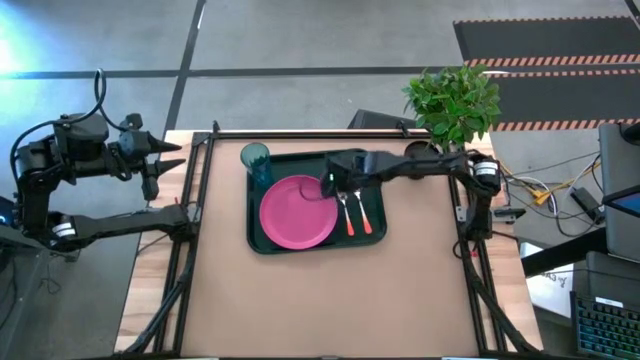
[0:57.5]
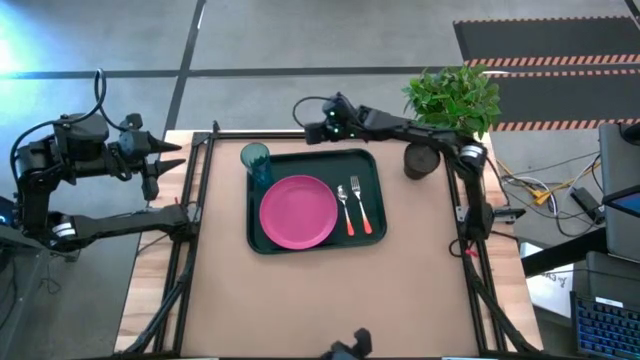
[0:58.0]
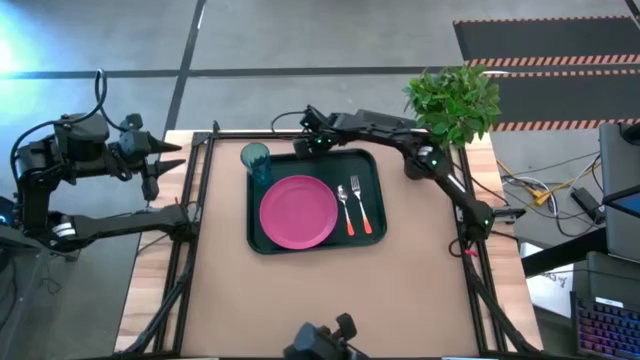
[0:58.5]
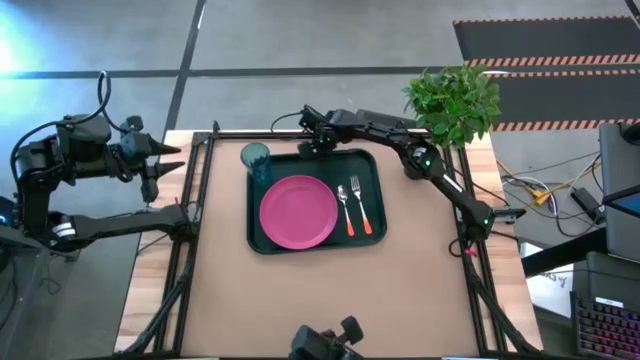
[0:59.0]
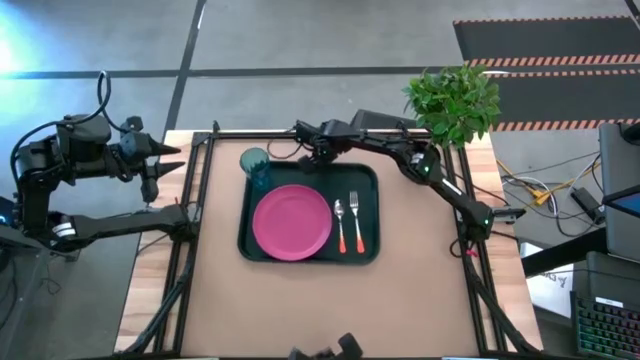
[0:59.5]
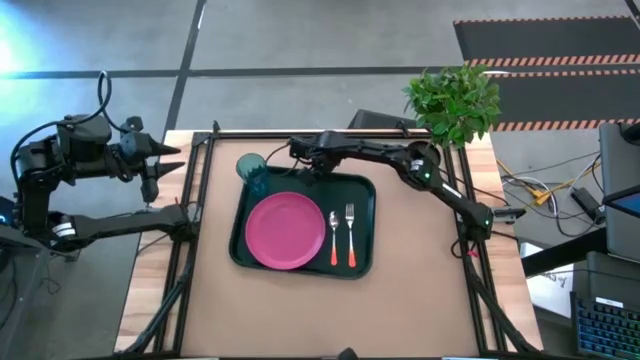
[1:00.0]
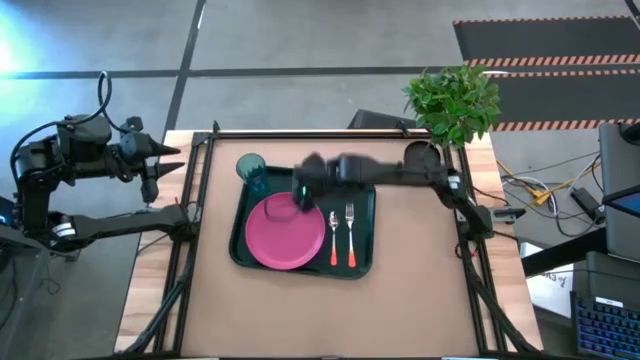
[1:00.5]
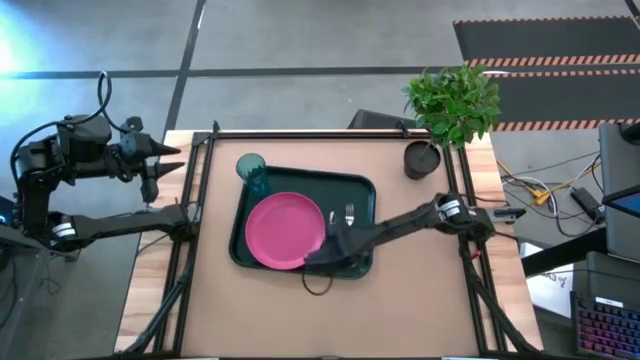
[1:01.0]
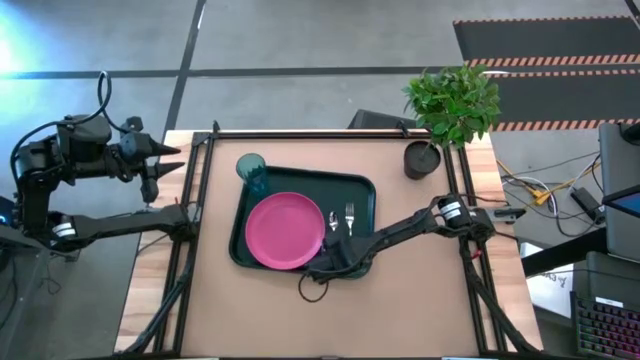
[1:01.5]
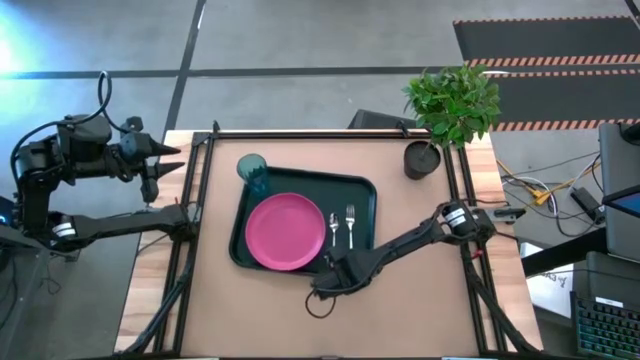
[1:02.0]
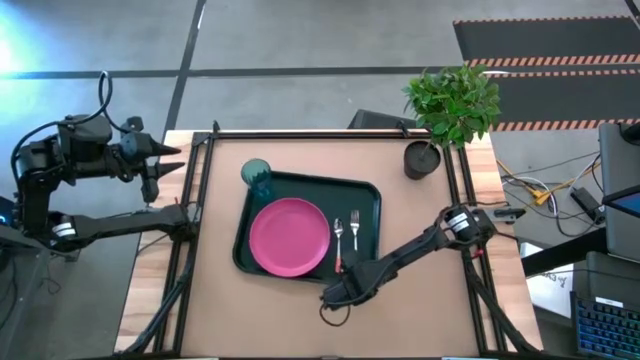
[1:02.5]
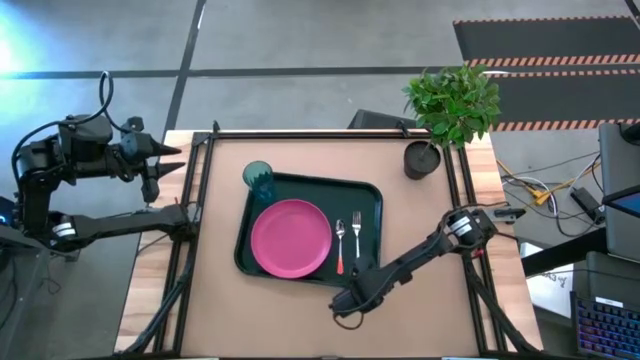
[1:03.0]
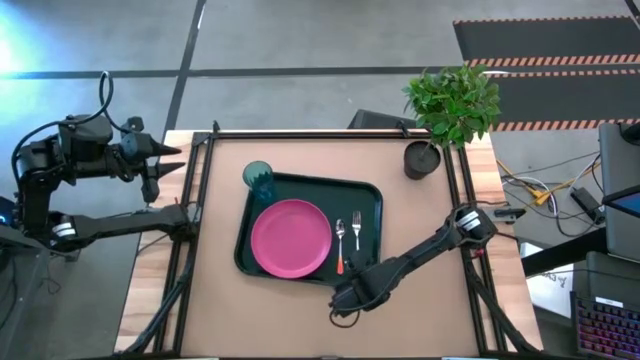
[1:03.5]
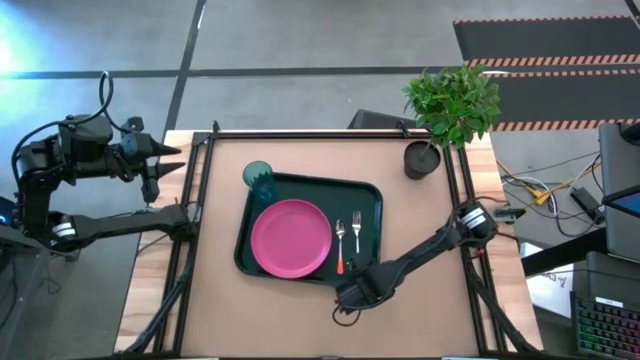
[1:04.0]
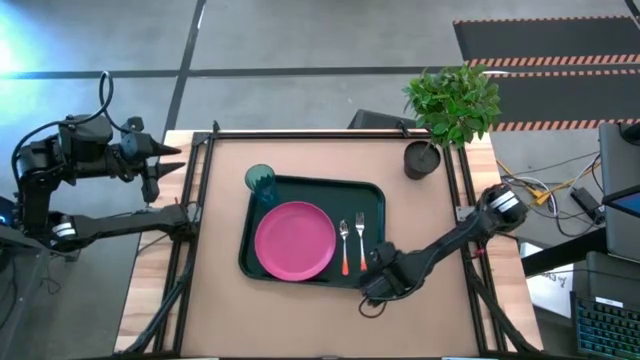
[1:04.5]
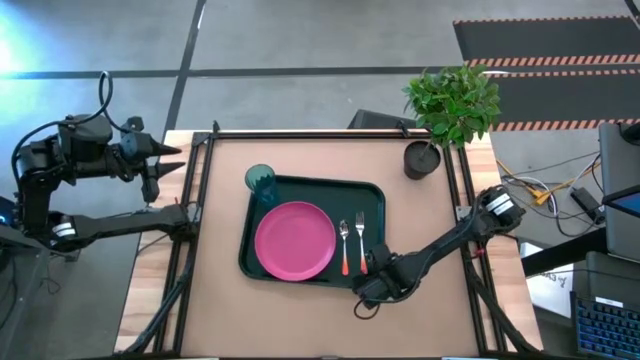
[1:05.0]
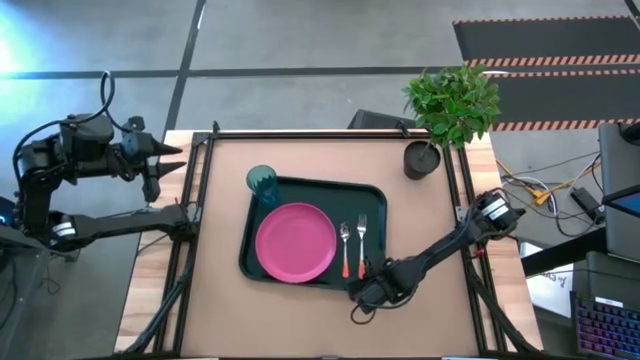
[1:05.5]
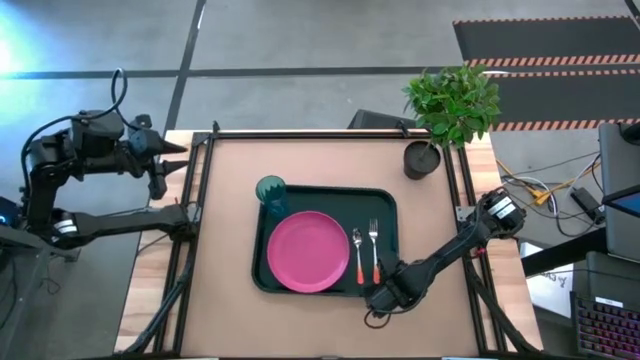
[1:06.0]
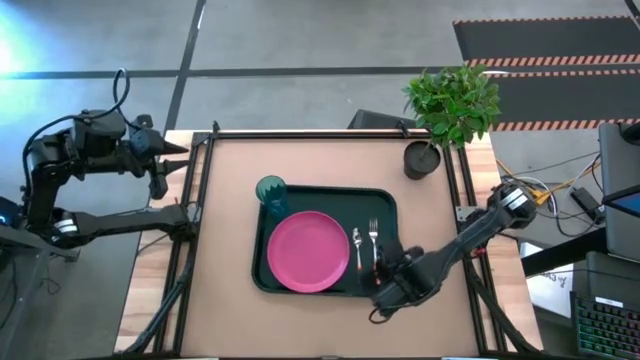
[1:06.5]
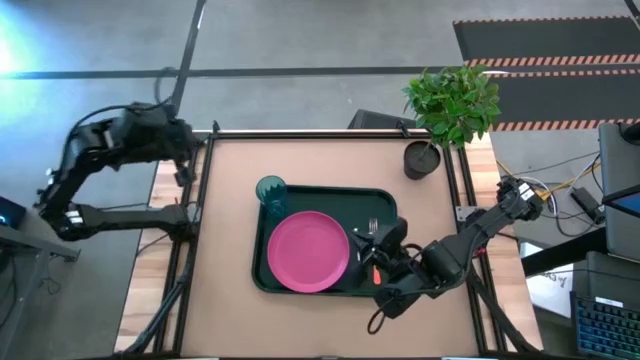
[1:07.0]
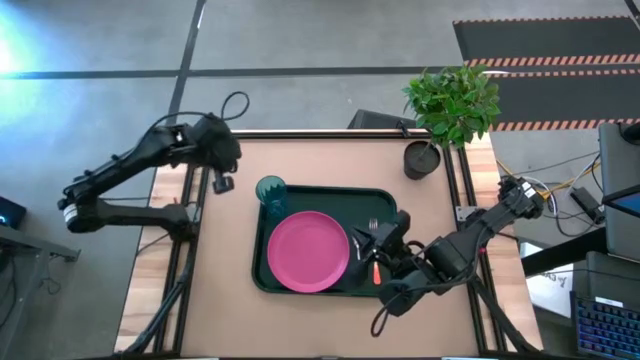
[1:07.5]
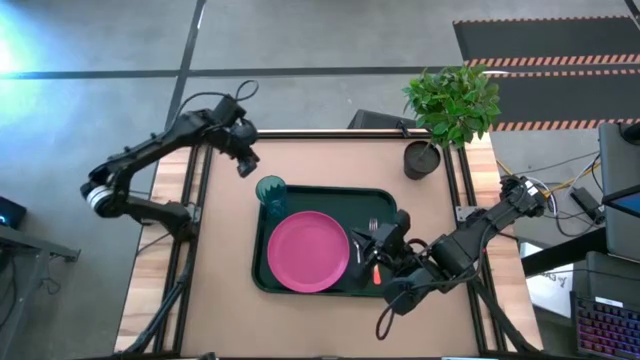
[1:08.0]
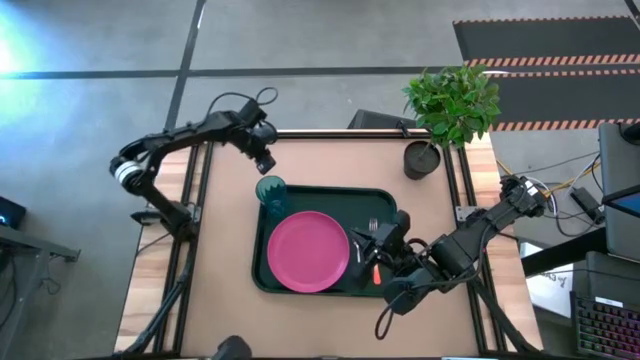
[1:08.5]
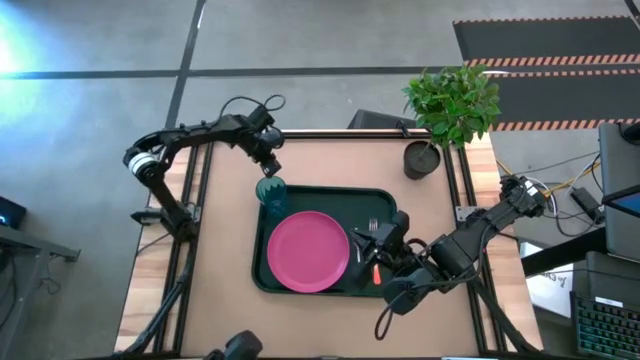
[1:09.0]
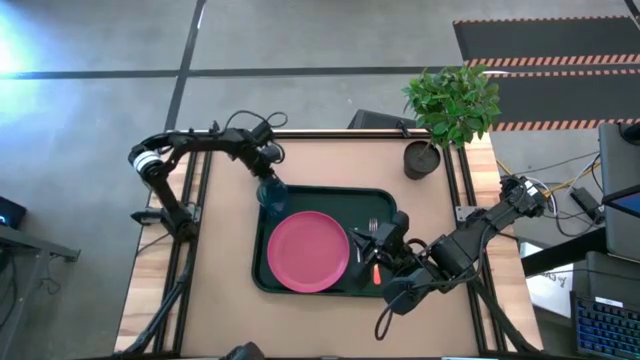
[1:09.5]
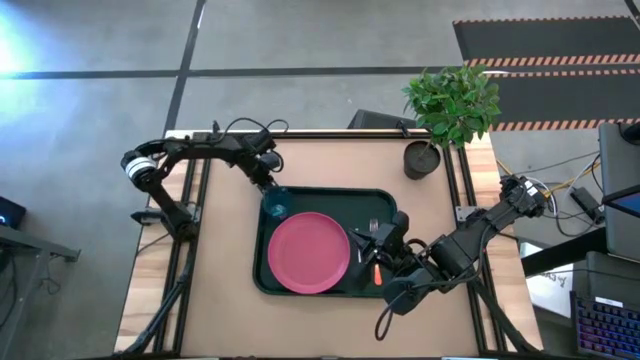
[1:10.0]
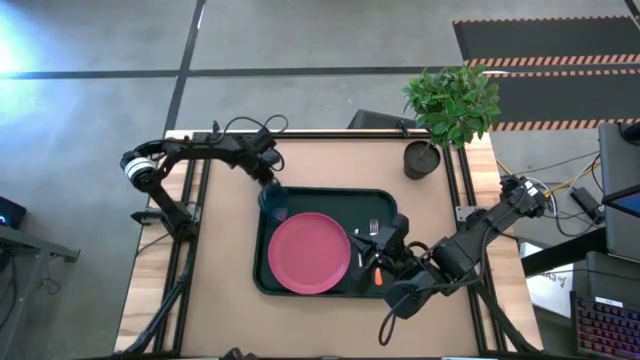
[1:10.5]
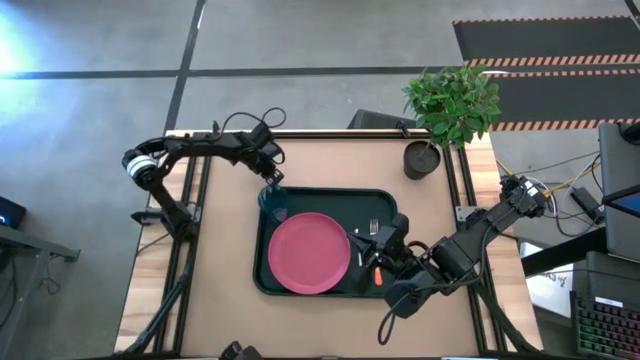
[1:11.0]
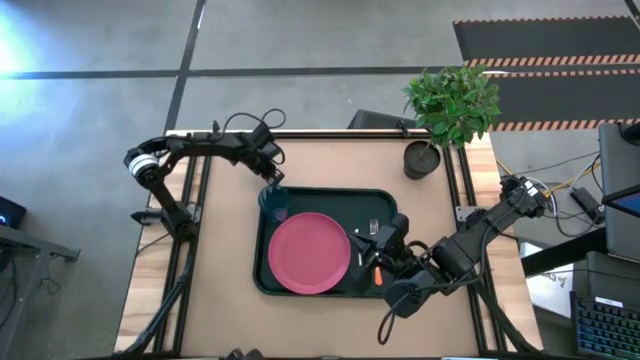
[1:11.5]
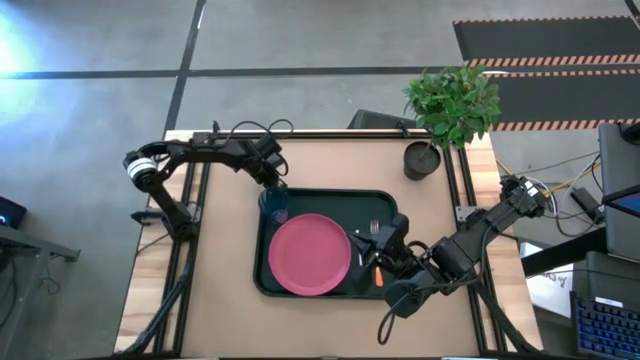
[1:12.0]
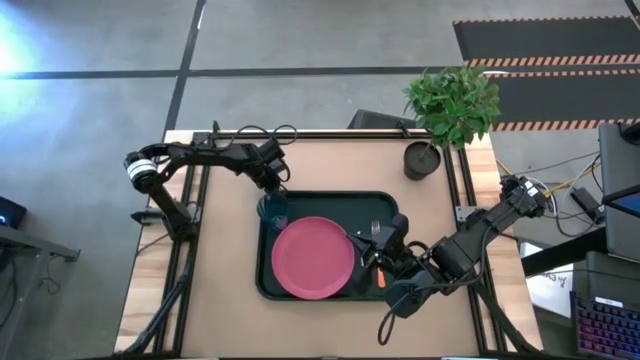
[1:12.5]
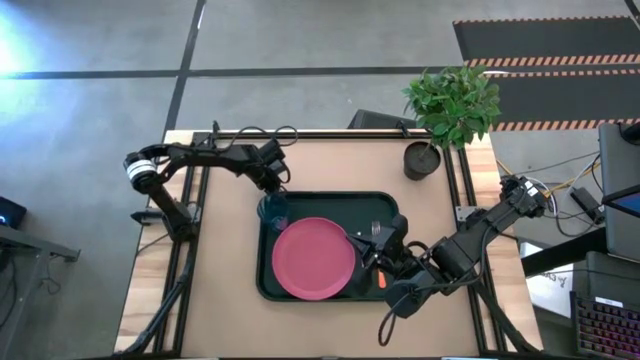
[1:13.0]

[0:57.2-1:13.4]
Task: Pick and place plate/cup/fork/spoon on tray
Move the black serving tray to the center of the table

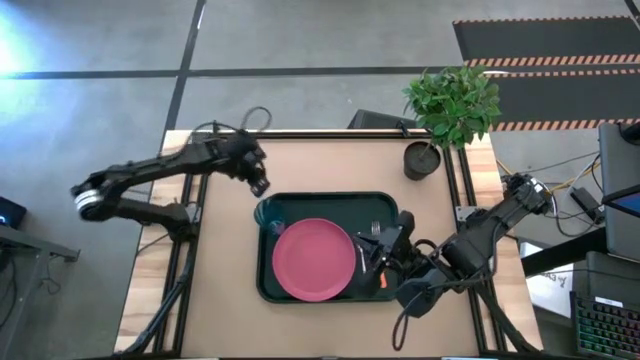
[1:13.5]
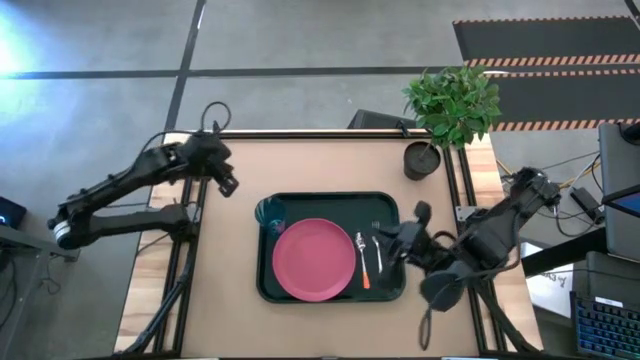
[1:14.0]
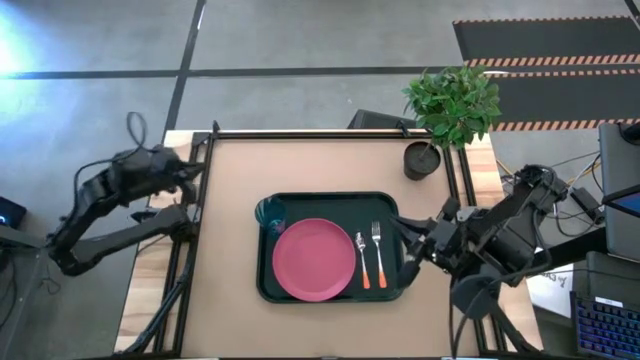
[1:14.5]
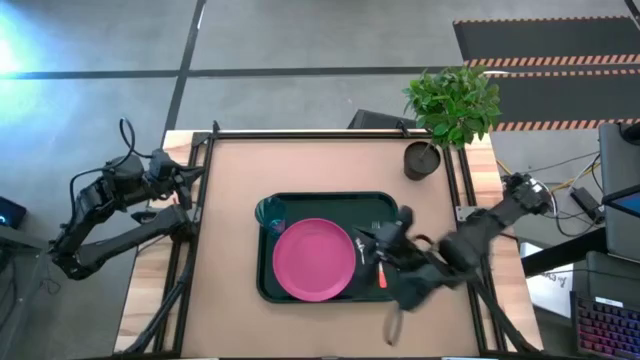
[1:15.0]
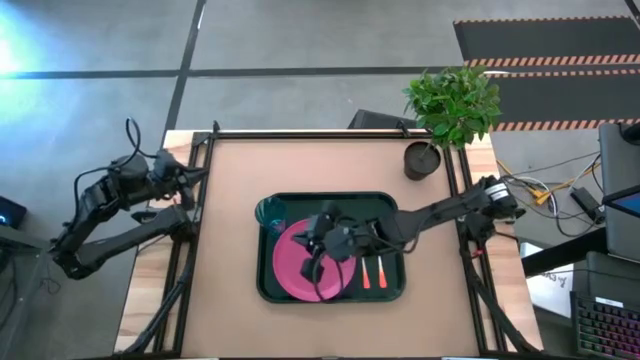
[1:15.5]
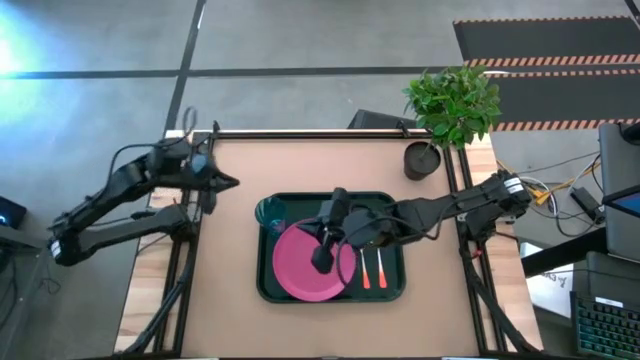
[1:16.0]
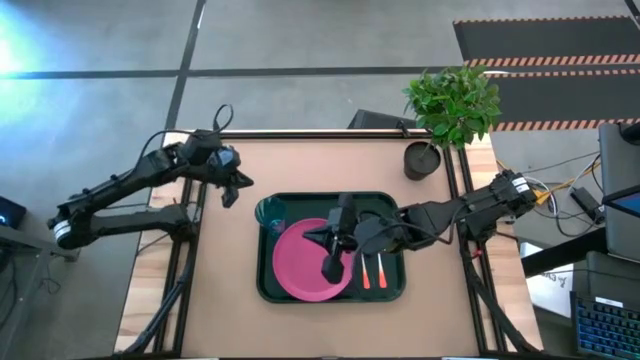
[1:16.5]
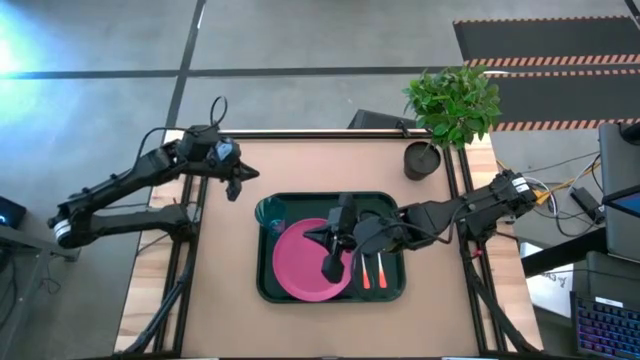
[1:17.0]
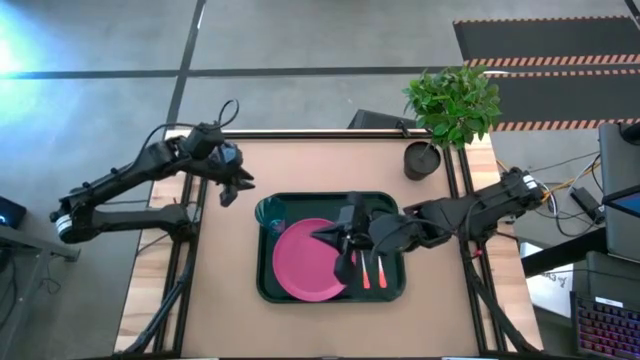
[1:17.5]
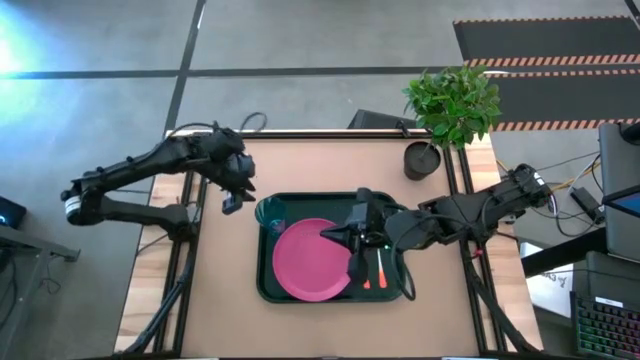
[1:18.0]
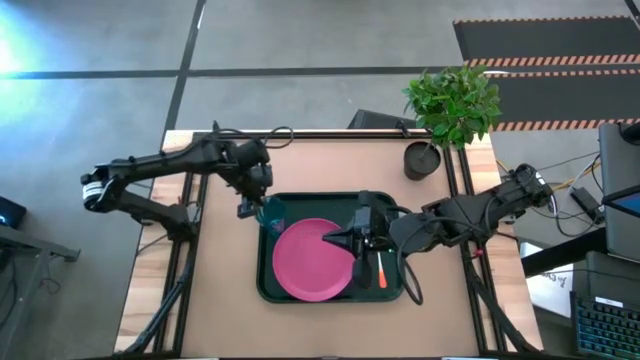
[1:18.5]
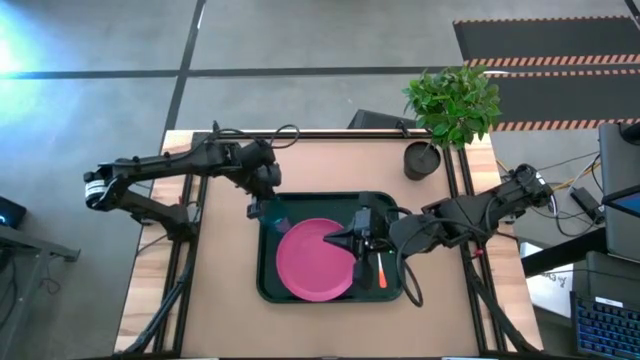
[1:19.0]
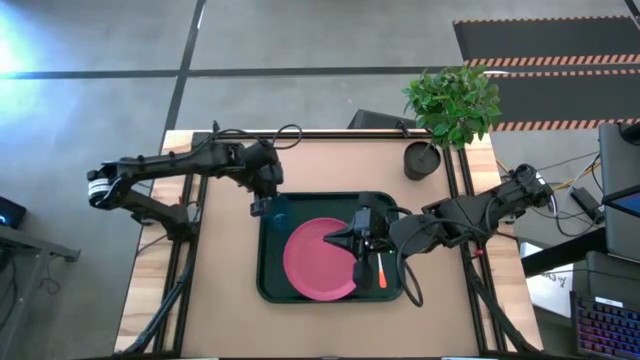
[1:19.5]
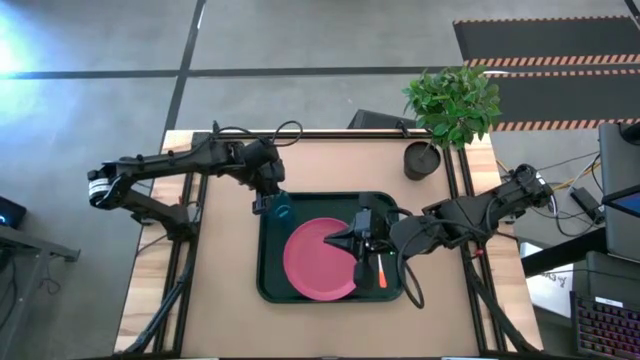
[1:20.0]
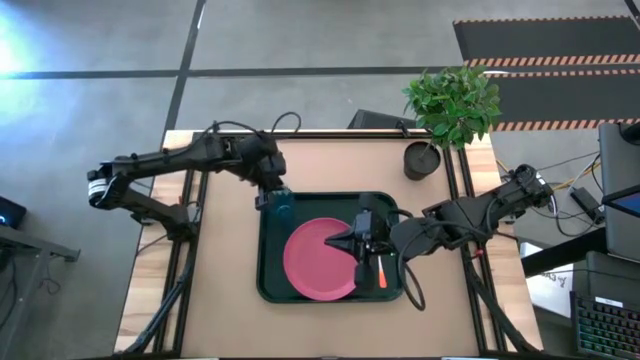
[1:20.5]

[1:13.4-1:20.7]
Adjust the blue glass on the black serving tray
